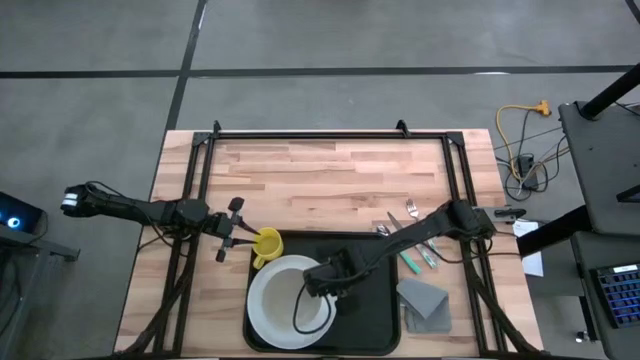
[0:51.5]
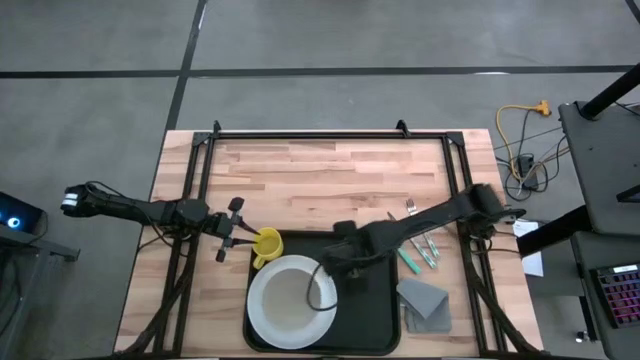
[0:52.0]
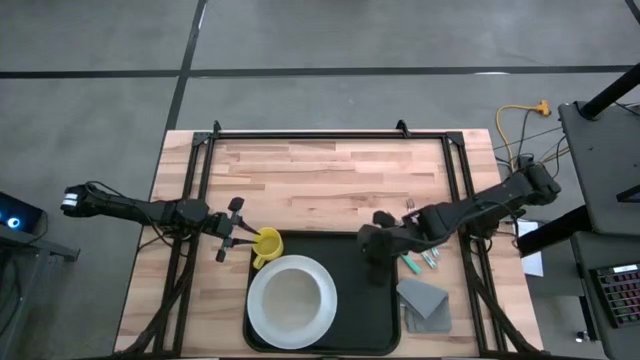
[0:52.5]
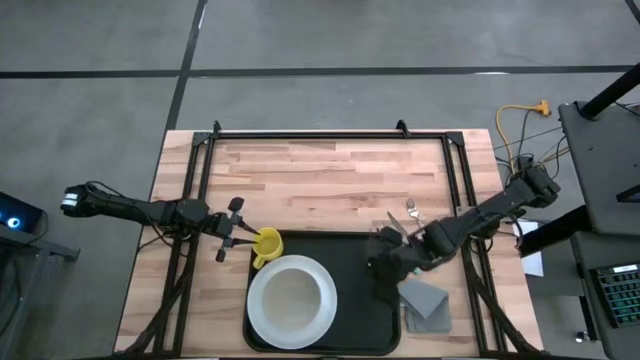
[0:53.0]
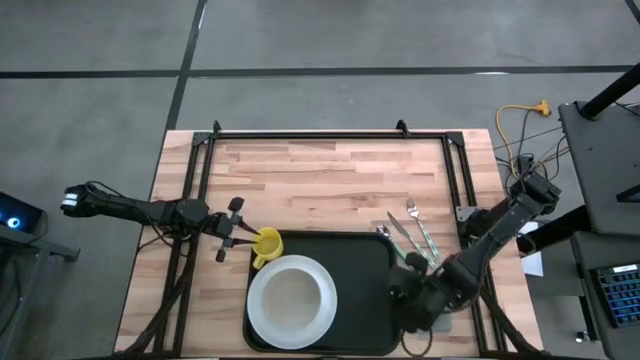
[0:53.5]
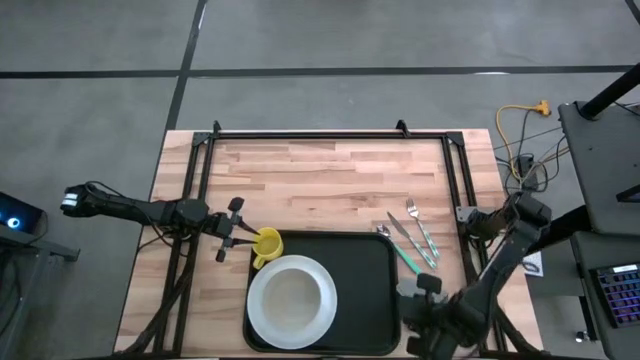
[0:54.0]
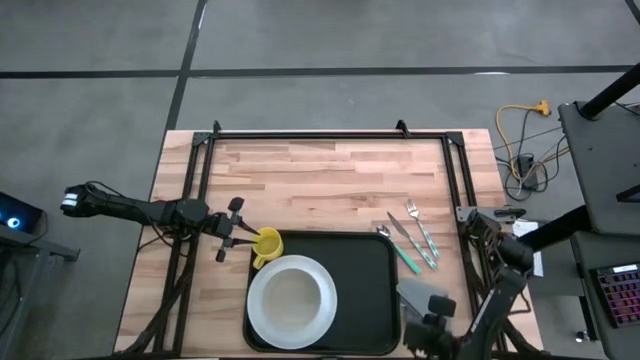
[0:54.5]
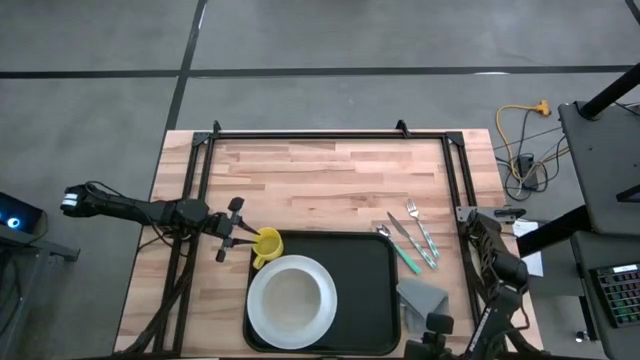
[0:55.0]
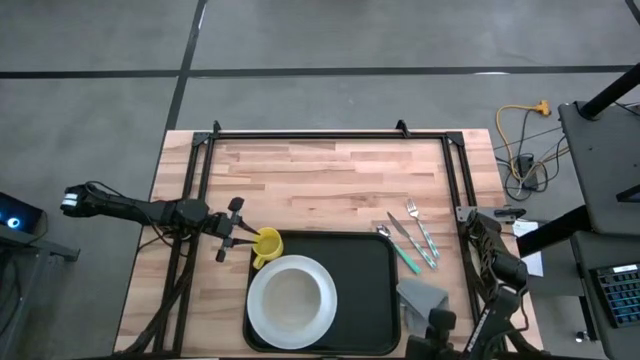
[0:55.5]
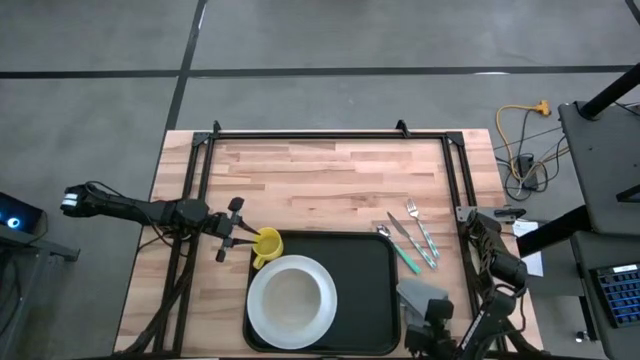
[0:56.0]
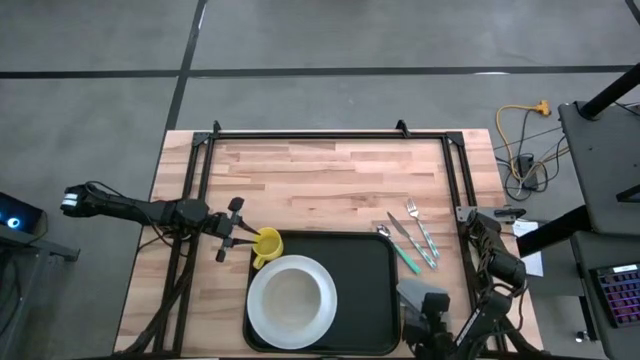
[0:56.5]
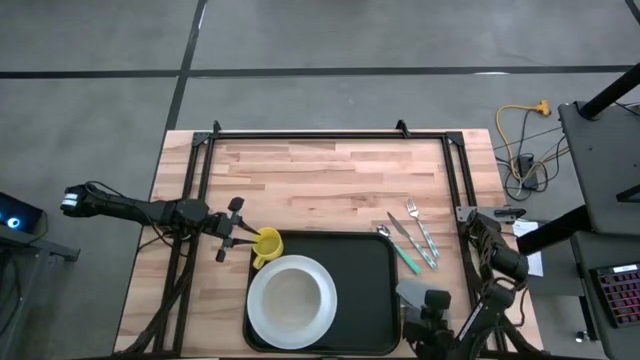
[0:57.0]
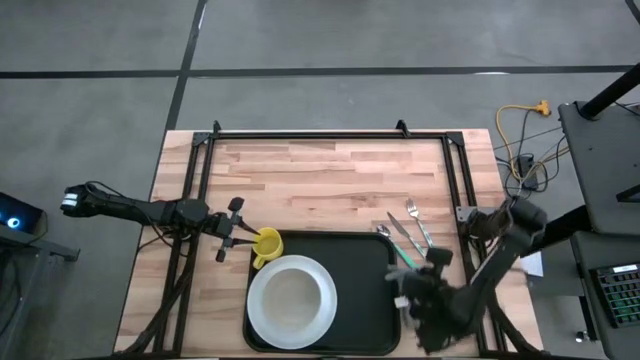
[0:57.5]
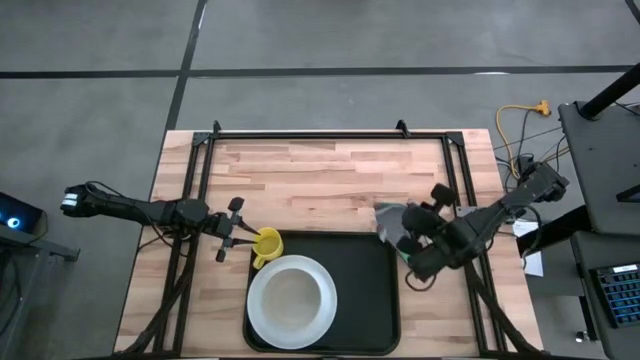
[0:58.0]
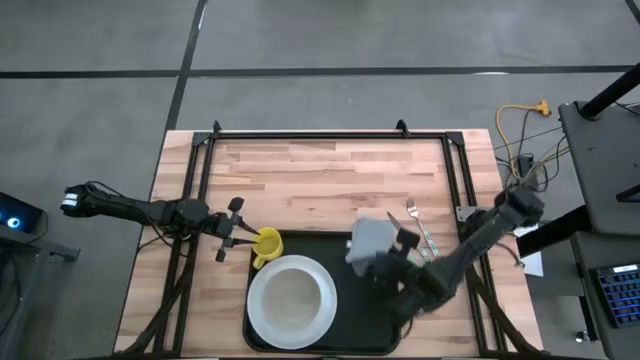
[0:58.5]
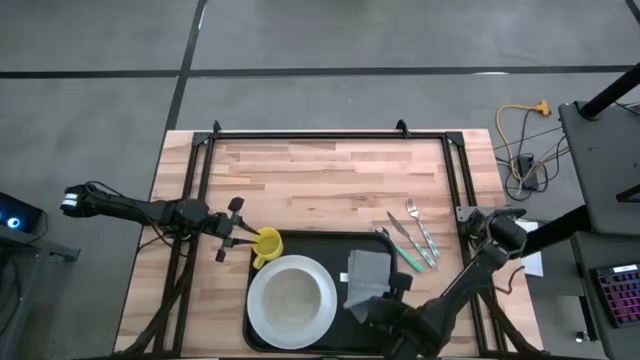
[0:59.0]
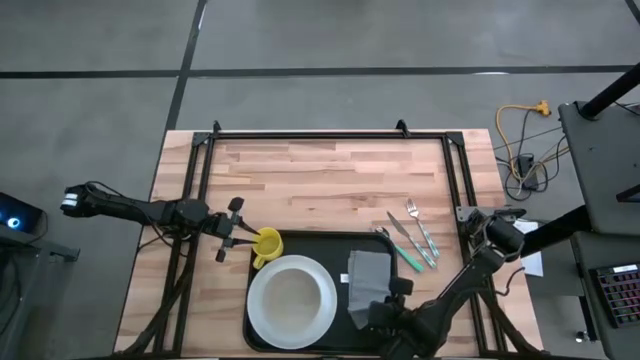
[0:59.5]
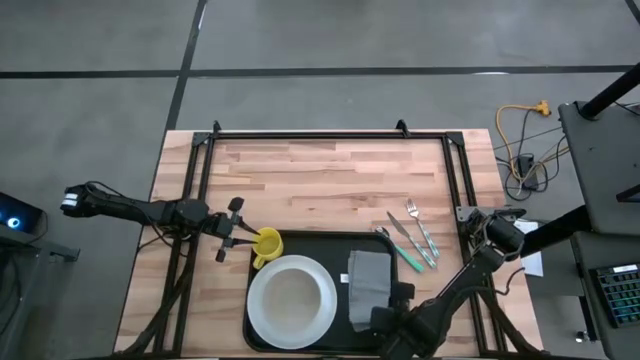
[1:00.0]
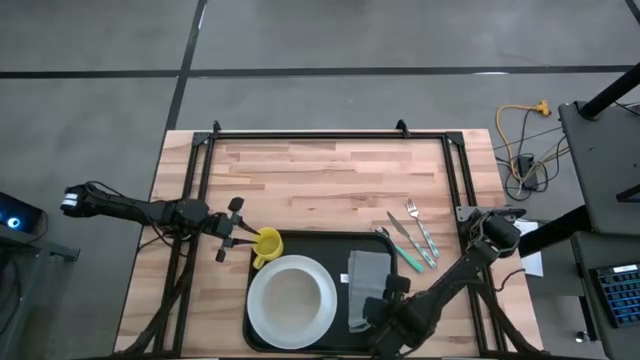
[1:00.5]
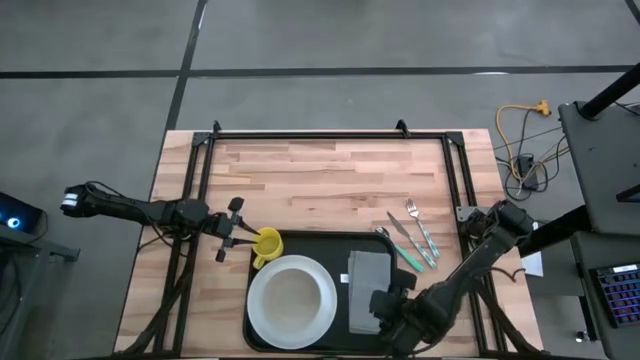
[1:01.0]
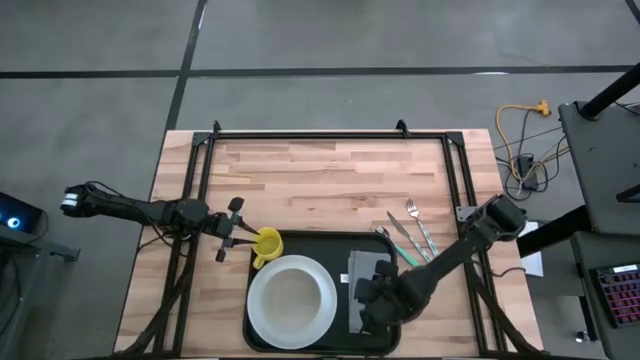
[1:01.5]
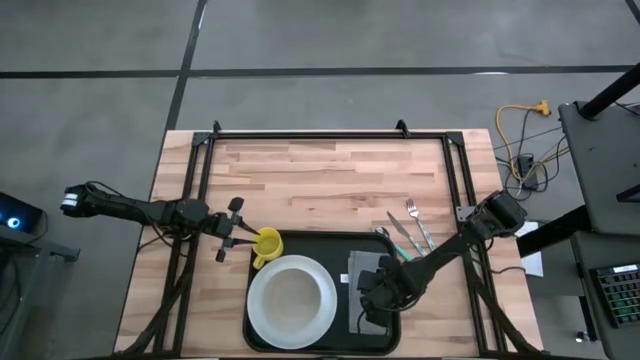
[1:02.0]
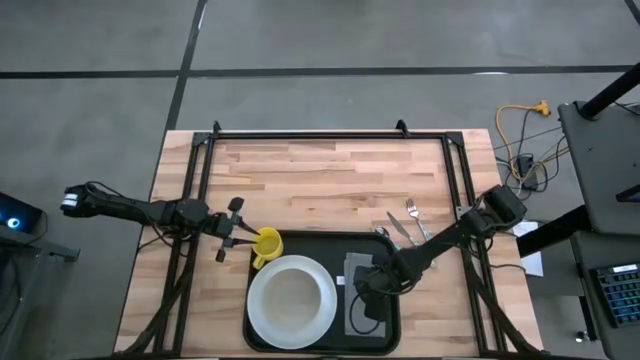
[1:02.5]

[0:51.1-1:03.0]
Task: Set up tray
Put the gray napkin on the black tray to the right of the white plate

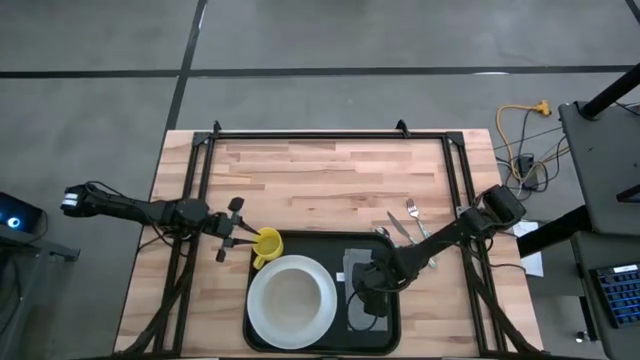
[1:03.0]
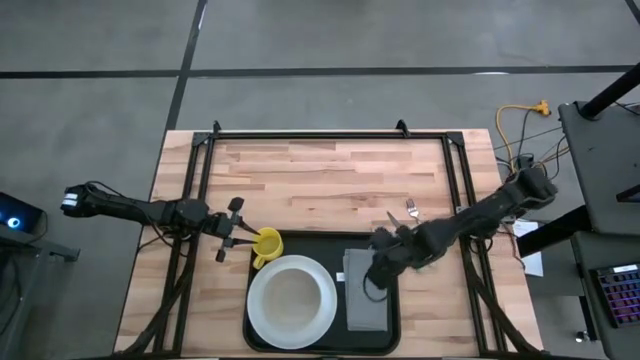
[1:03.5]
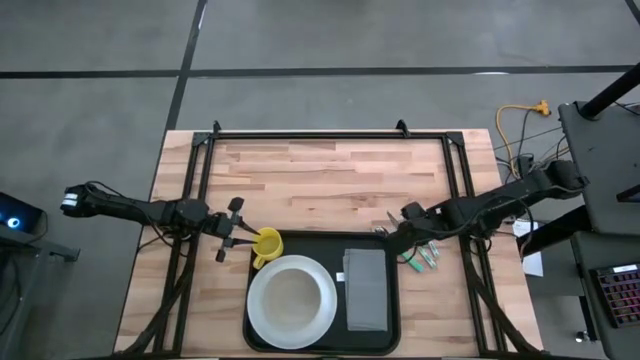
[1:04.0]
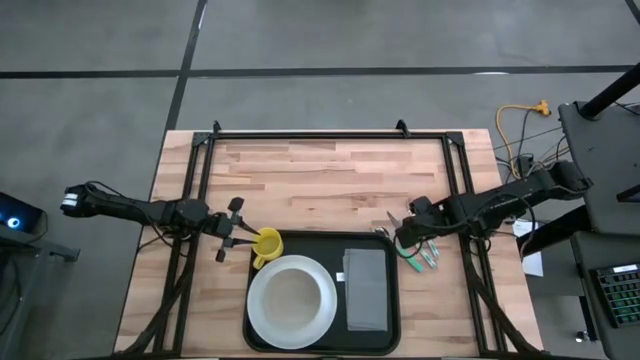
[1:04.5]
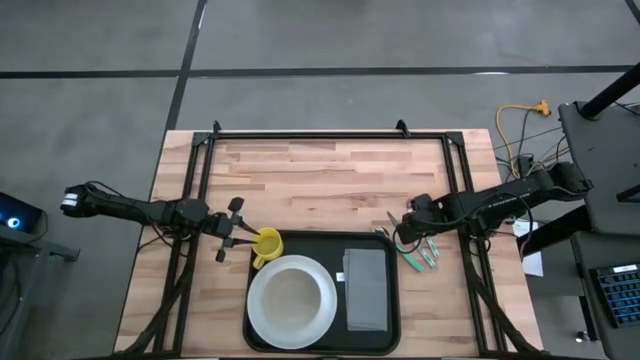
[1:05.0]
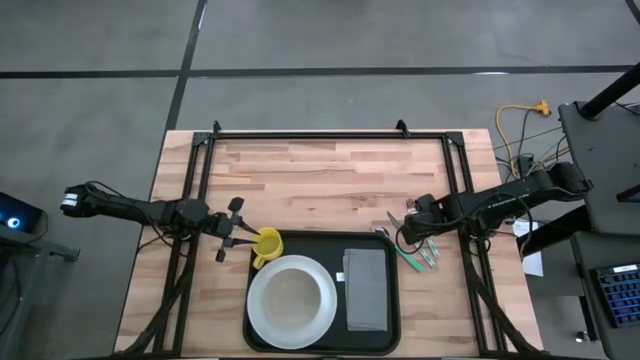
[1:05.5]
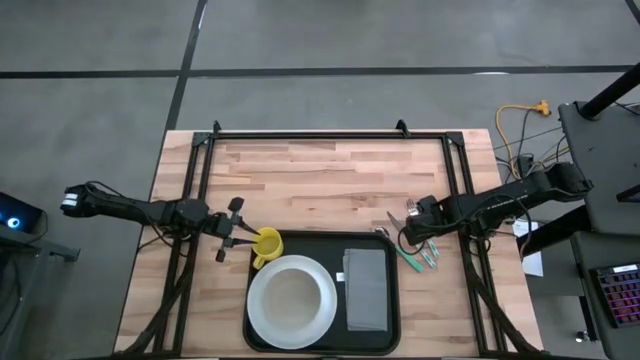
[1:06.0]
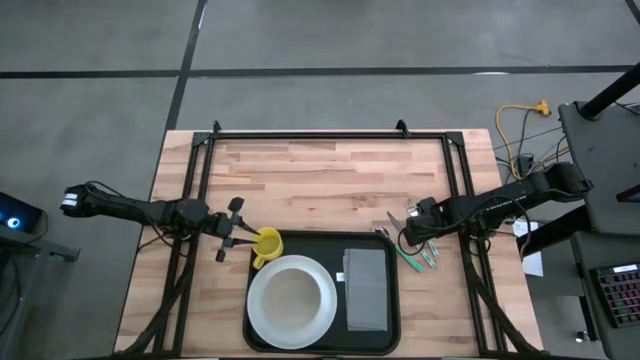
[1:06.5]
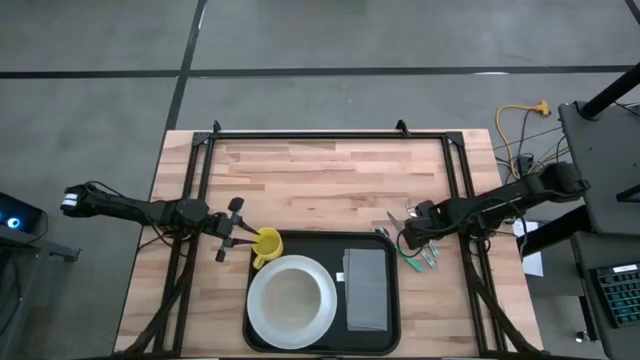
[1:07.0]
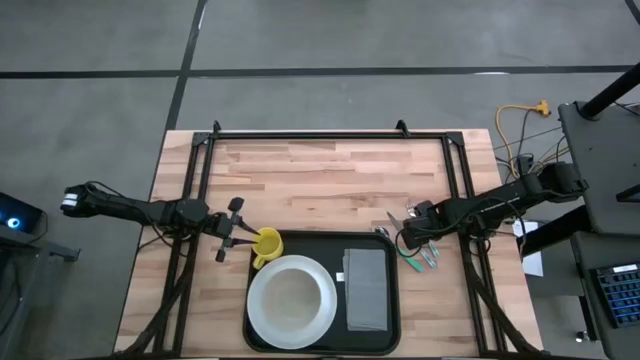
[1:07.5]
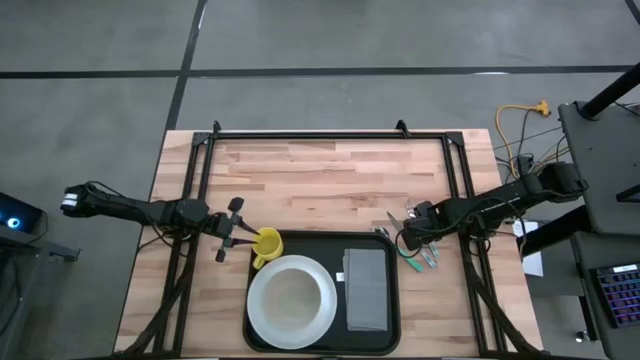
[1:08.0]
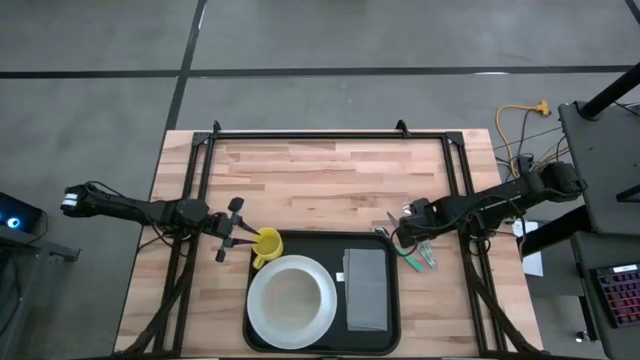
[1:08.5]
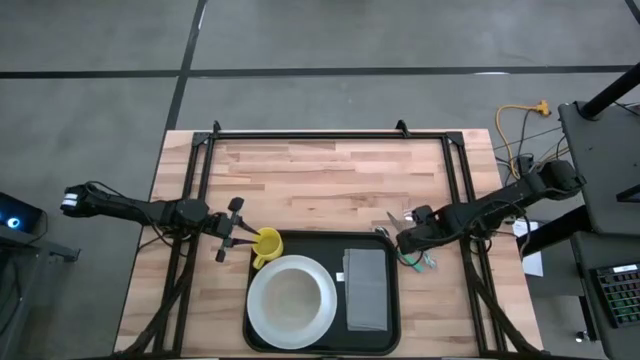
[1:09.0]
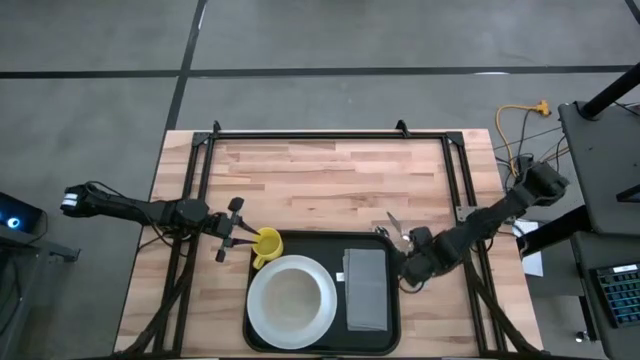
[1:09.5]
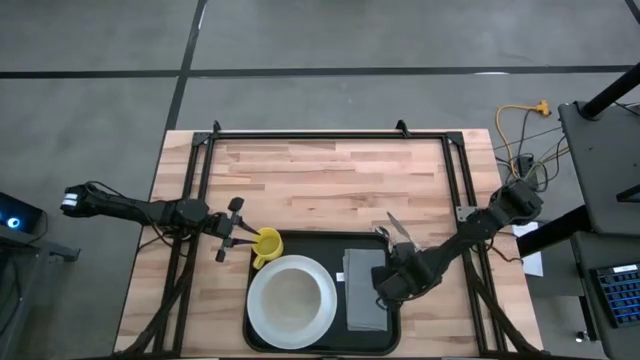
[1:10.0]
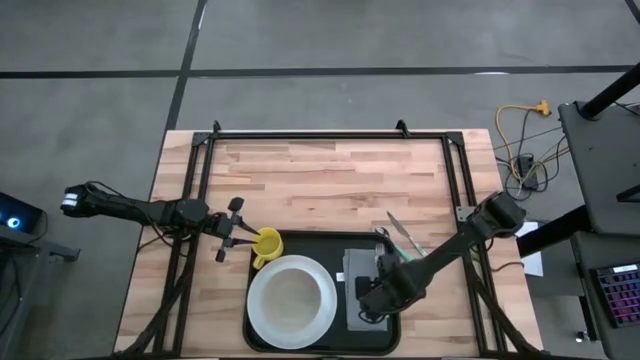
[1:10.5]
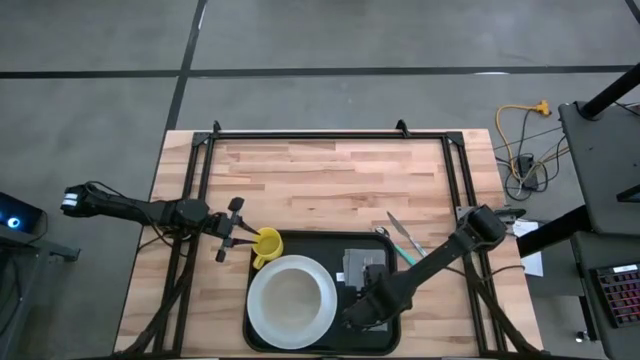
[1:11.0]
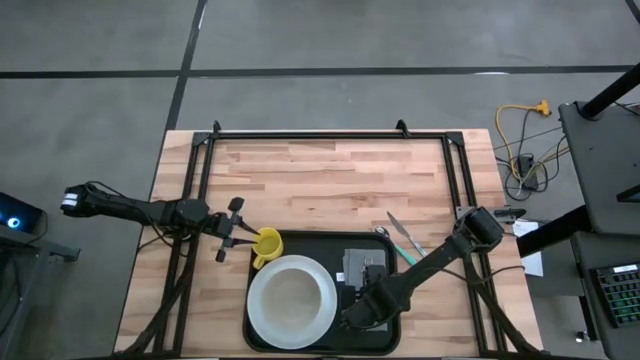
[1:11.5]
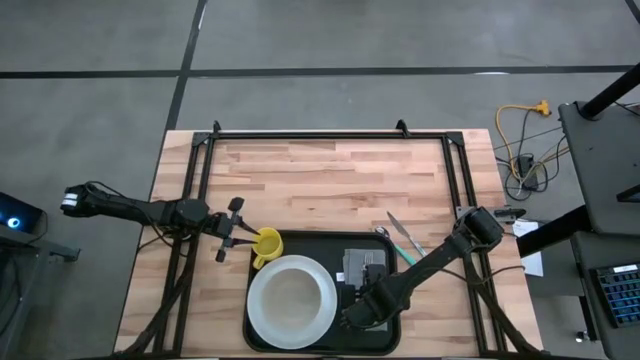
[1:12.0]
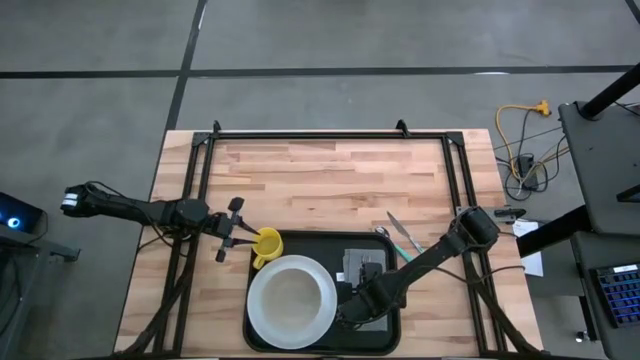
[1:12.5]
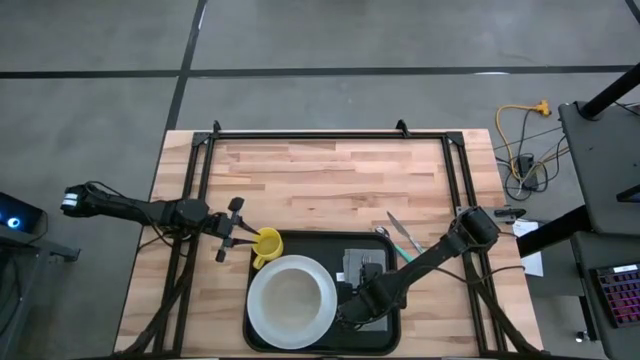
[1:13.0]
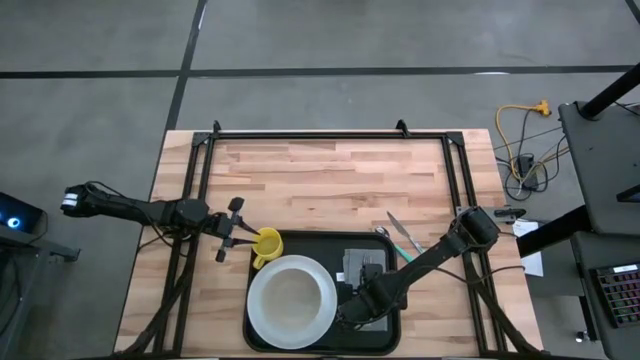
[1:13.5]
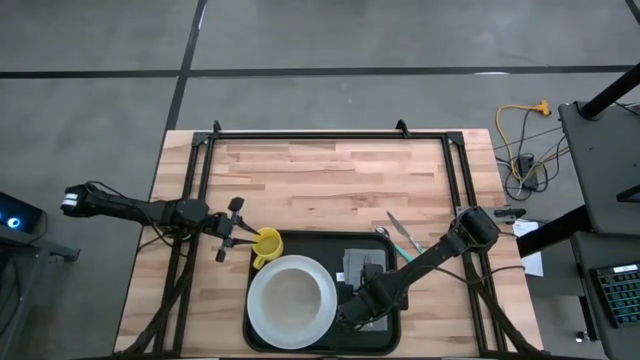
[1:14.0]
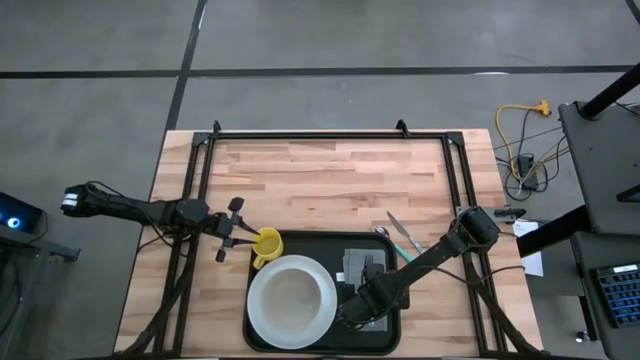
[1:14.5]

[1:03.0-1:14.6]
Put the white patterned fork on the gray napkin to the right of the white plate
